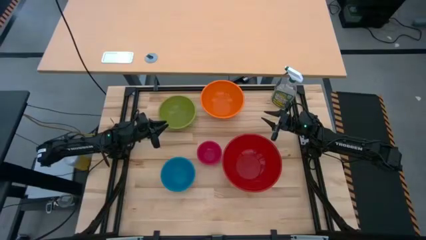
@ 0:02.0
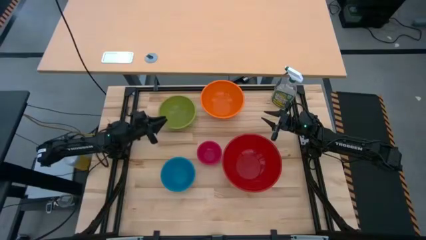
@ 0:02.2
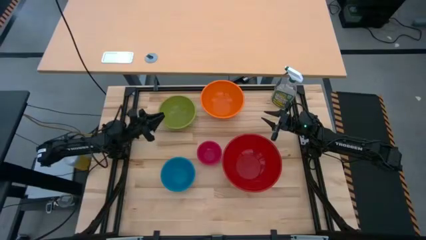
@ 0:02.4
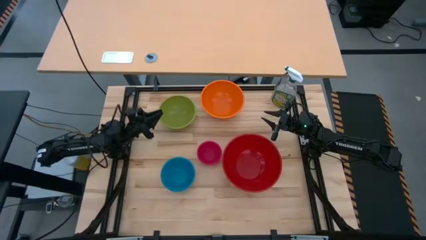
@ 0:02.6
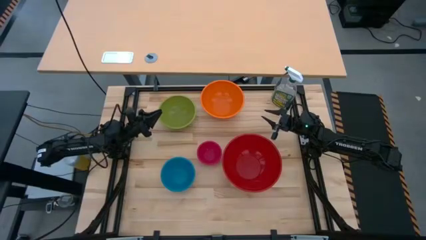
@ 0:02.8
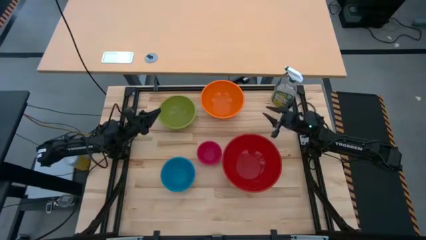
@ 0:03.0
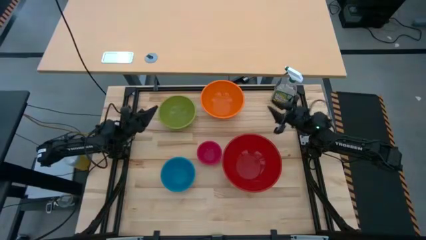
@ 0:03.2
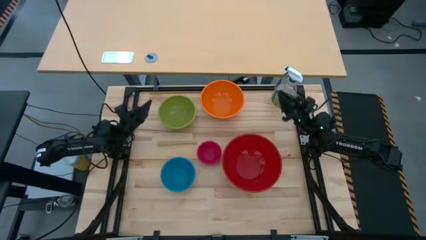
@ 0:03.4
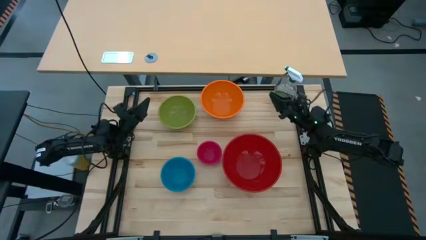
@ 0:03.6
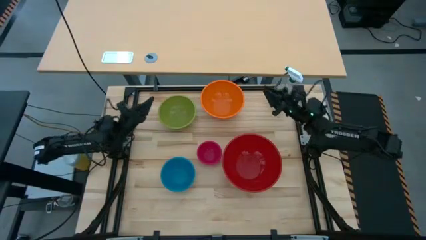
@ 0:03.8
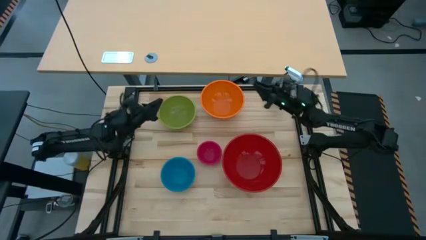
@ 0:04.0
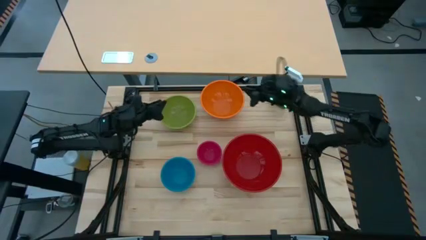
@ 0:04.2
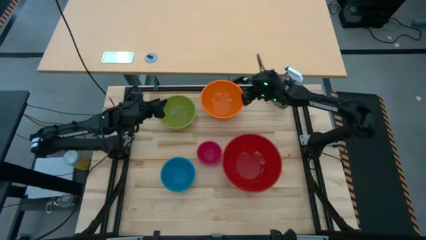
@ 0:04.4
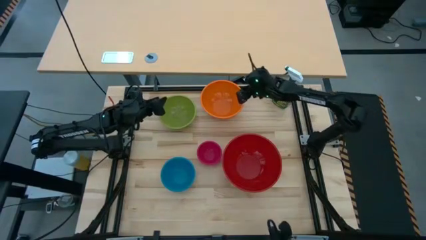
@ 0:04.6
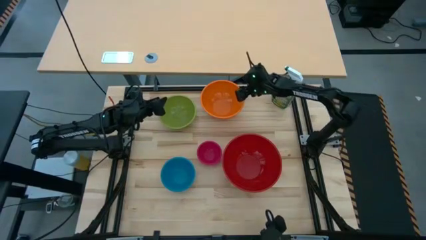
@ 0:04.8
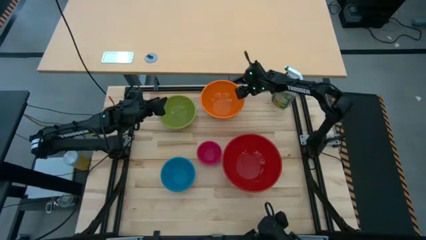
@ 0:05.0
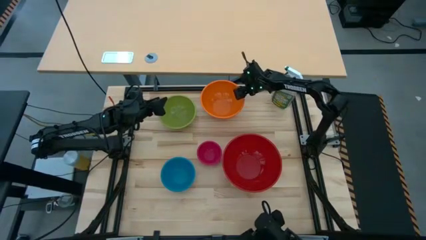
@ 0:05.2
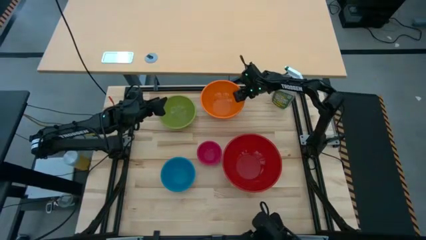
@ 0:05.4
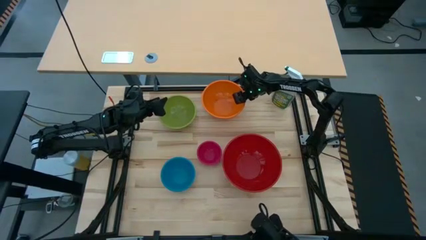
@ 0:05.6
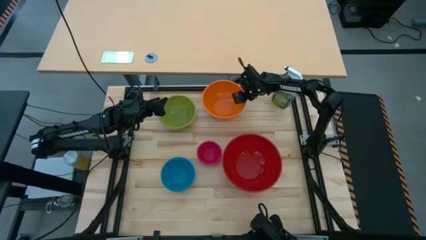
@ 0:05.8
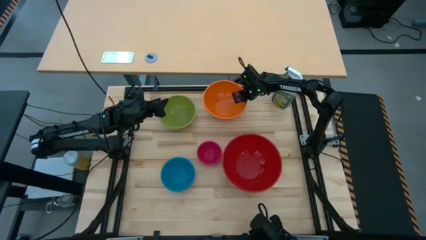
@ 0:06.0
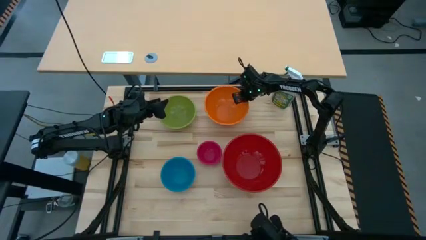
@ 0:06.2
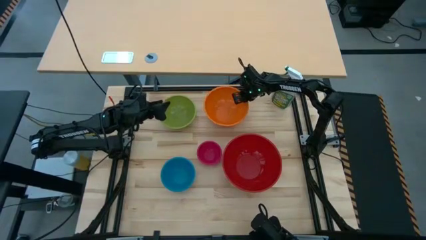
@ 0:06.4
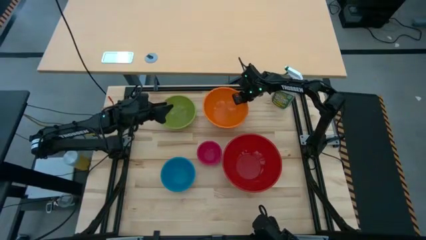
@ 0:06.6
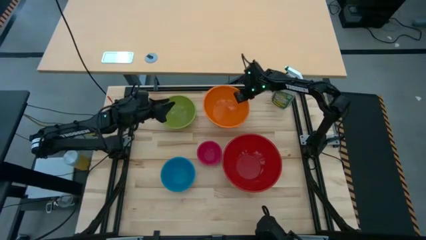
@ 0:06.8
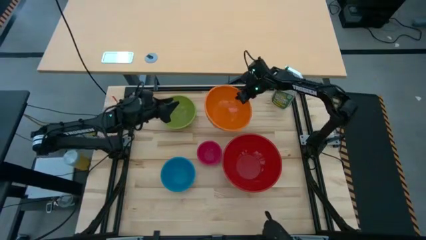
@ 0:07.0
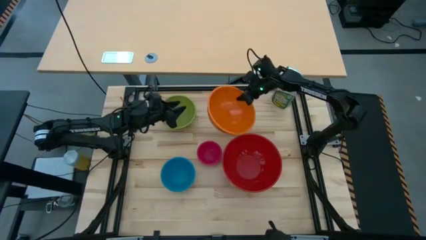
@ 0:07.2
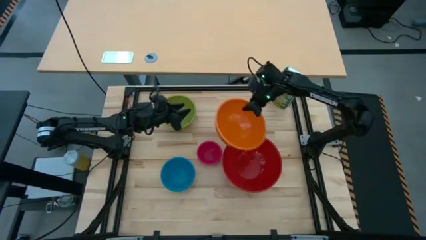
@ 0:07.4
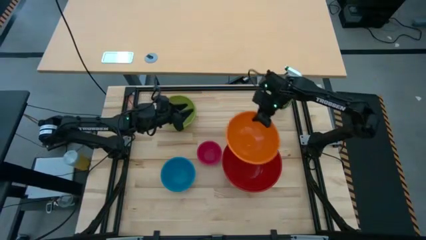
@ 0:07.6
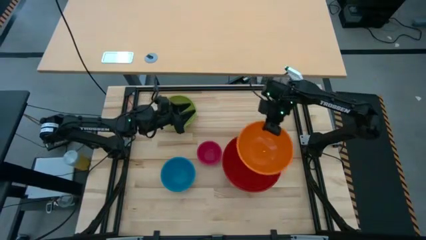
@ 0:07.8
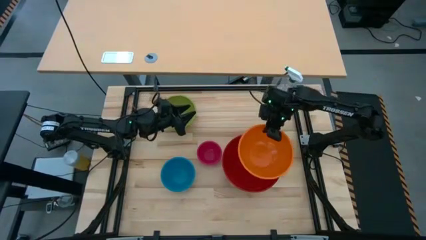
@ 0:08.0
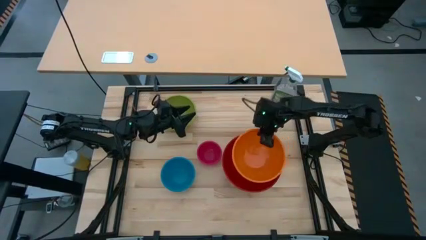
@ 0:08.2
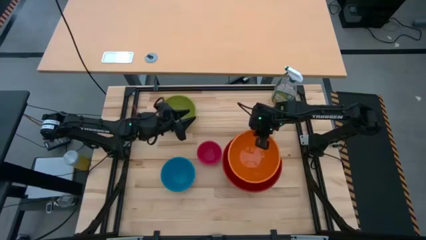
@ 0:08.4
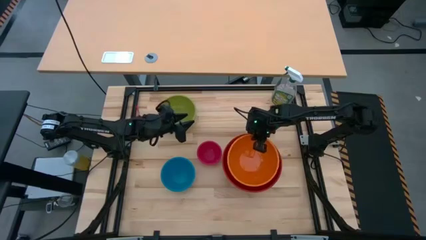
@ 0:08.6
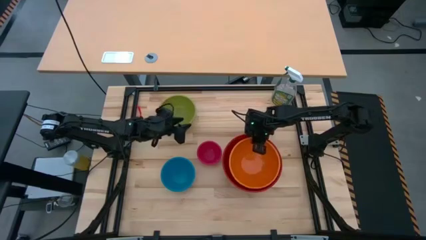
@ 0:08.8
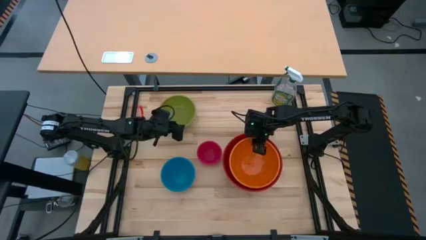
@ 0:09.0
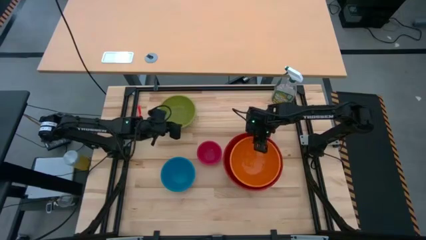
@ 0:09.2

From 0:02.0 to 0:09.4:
Stack the orange bowl on top of the red bowl

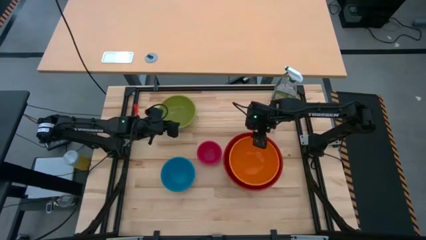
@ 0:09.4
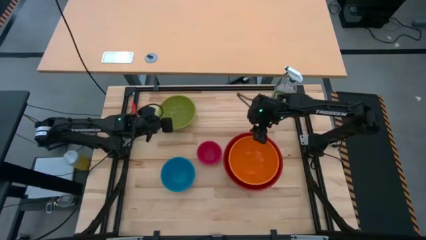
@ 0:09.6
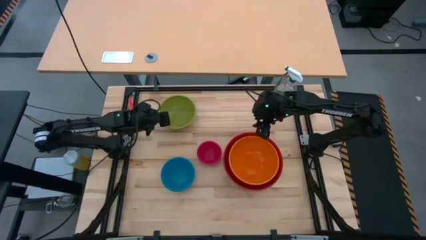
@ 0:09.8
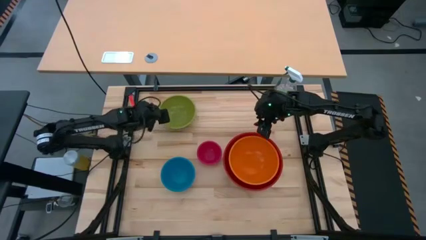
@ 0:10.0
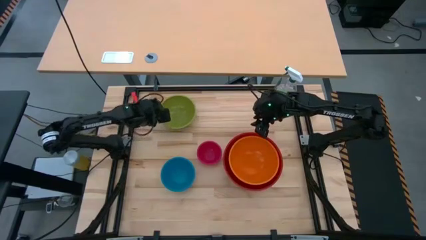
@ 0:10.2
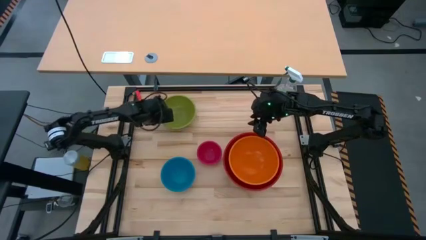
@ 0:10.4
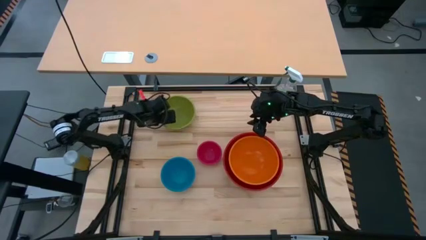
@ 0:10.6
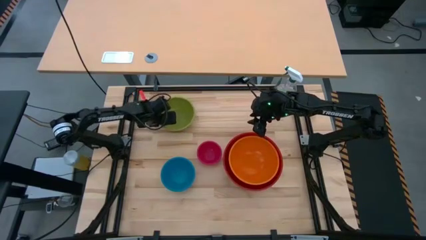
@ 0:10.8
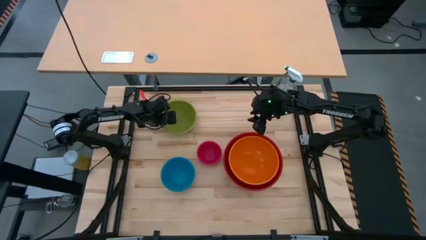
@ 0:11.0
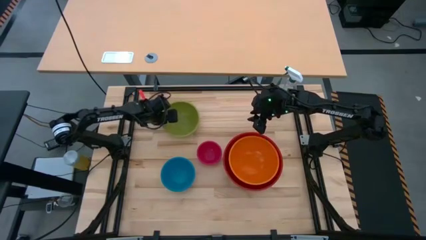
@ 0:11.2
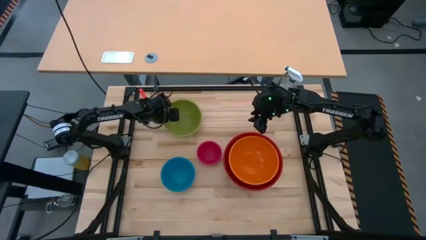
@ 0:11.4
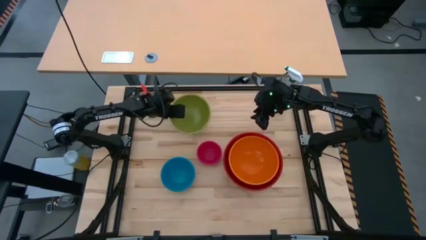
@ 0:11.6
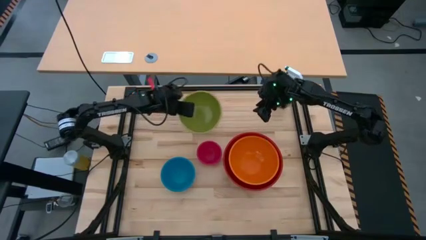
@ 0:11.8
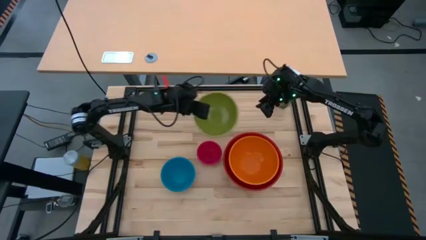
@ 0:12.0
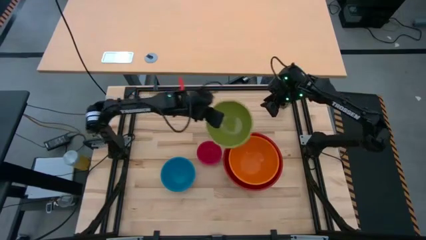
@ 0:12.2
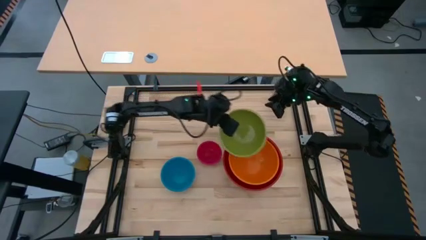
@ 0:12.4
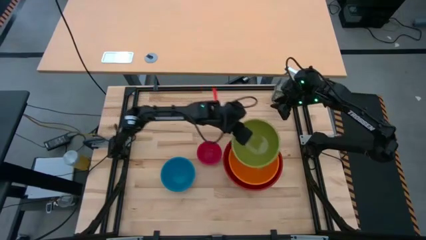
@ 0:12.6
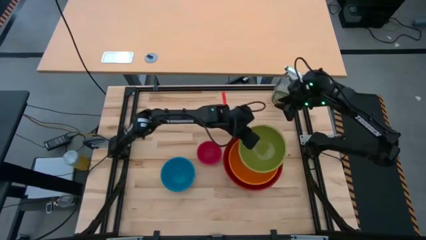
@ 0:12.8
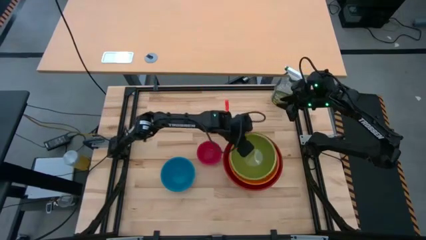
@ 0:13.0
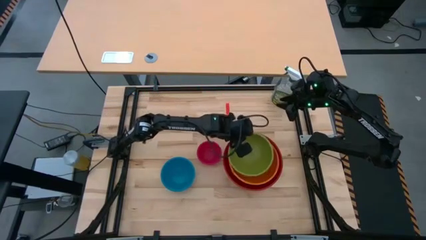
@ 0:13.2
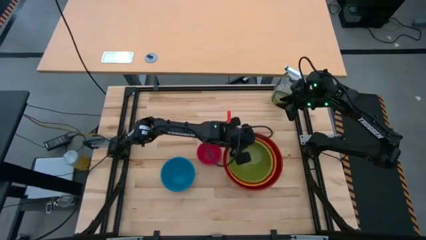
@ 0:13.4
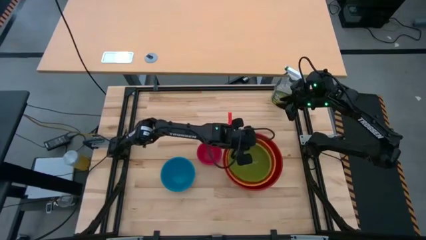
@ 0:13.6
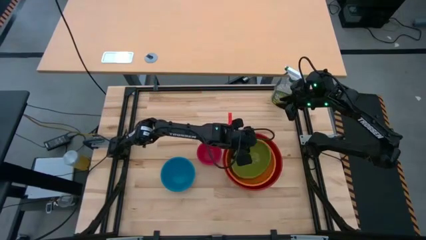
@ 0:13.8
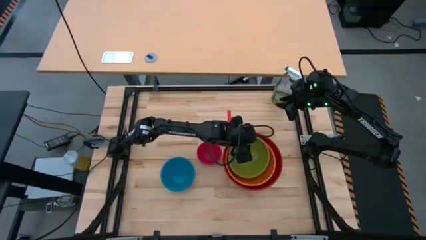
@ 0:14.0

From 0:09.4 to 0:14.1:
Stack the green bowl on top of the orange bowl

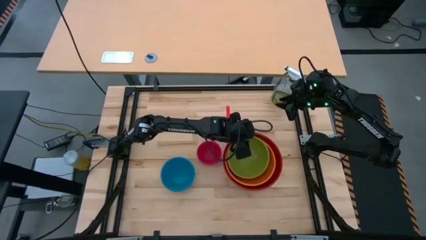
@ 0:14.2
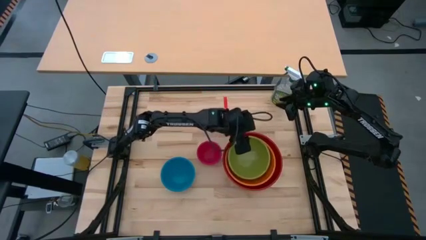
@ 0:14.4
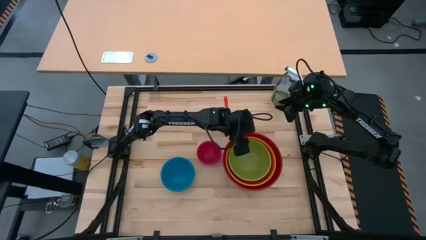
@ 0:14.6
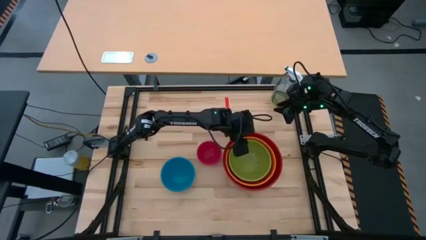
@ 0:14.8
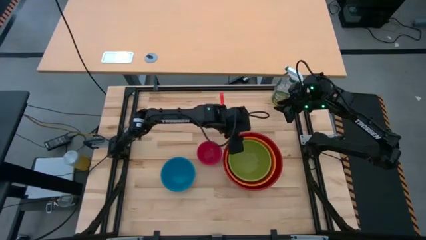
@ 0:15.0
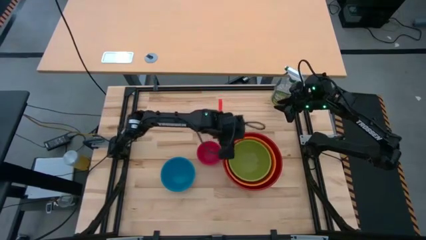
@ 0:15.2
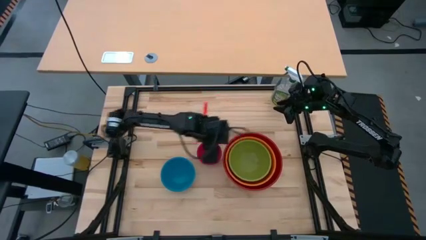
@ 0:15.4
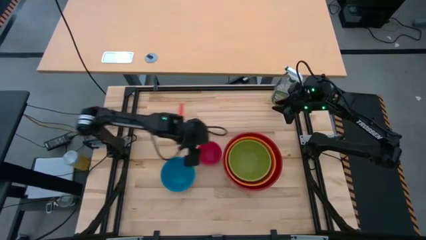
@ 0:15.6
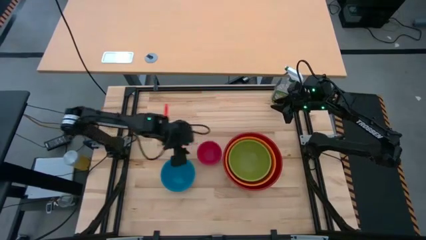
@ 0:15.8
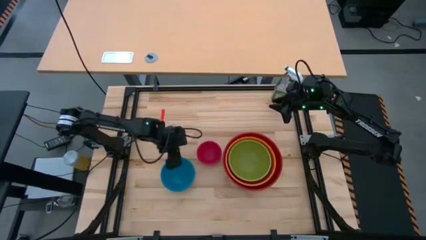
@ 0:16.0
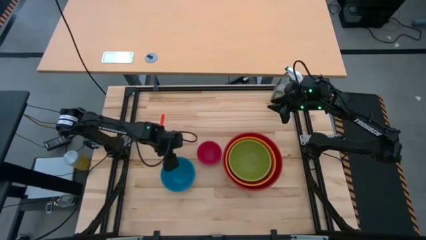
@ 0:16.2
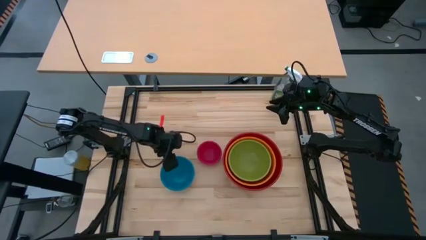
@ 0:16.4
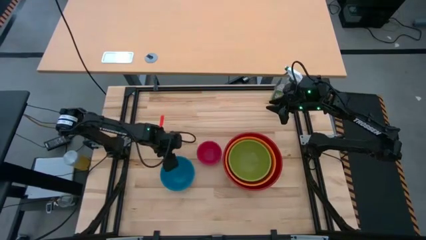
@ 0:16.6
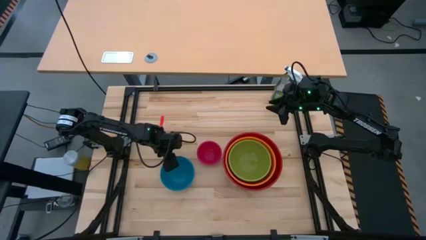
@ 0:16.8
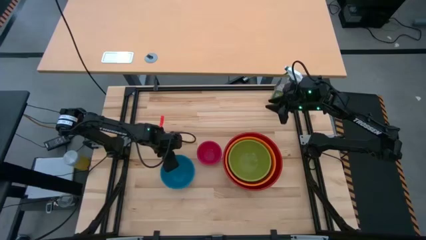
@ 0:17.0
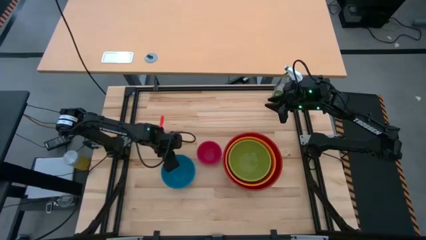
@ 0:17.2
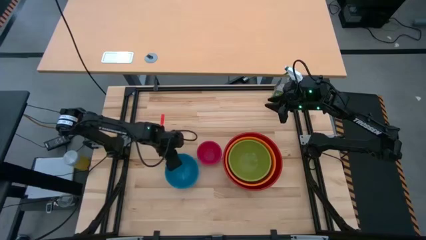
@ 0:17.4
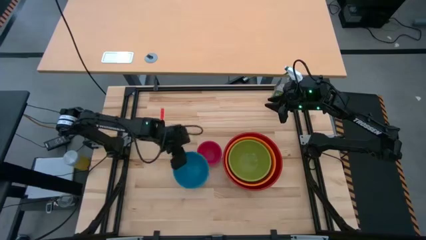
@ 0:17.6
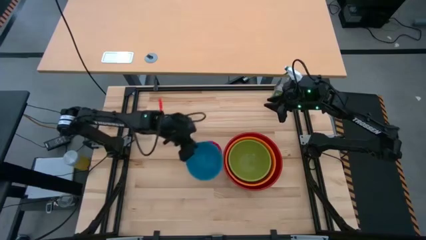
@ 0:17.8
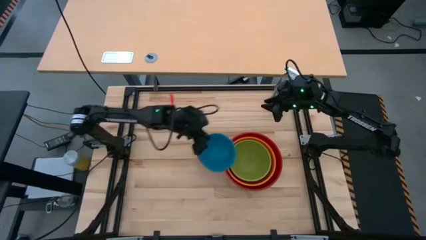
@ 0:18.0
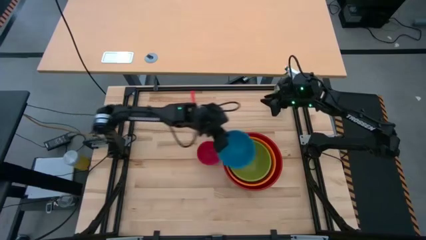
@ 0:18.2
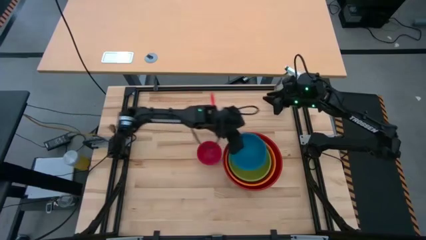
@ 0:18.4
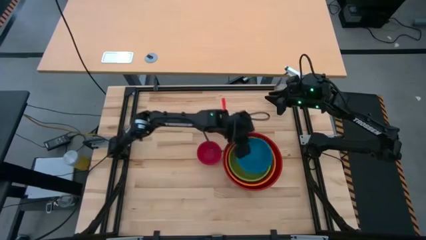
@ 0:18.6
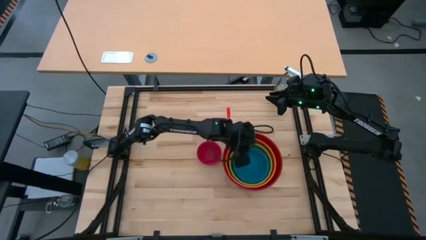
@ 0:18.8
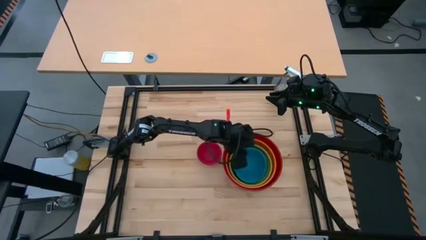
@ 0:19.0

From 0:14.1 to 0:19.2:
Stack the blue bowl on top of the green bowl
